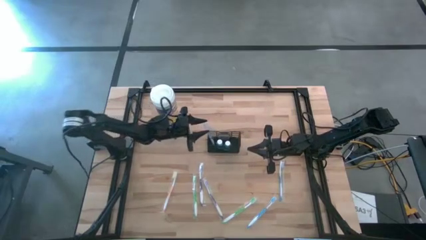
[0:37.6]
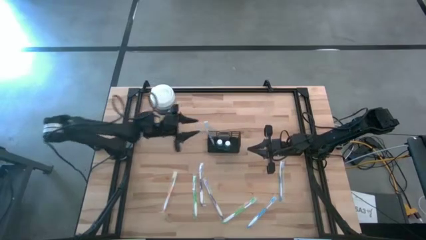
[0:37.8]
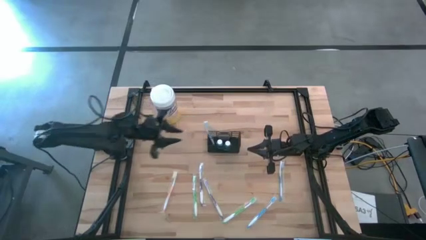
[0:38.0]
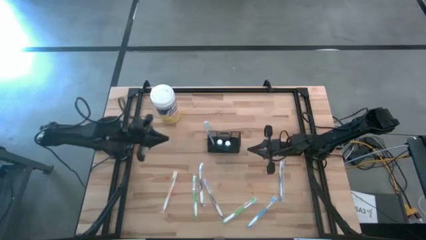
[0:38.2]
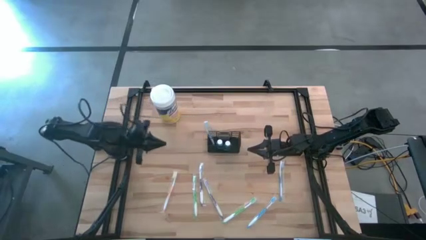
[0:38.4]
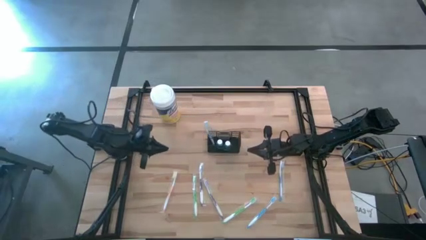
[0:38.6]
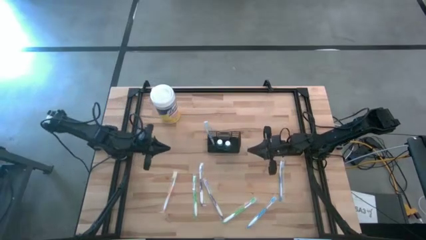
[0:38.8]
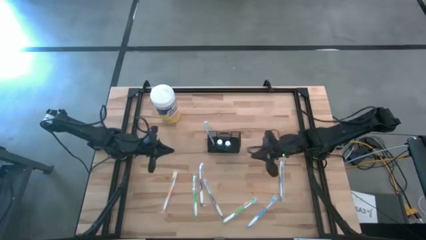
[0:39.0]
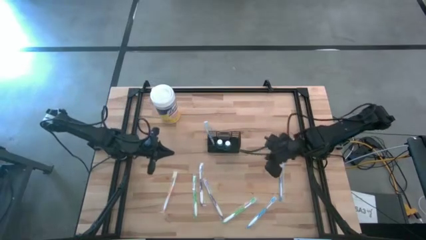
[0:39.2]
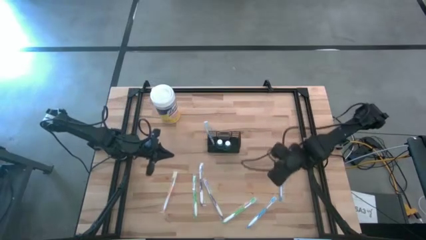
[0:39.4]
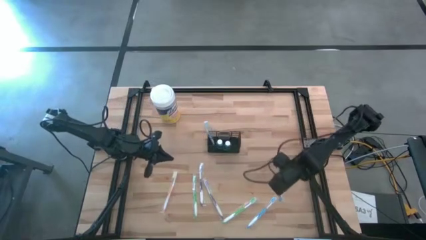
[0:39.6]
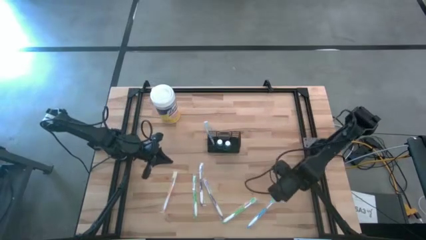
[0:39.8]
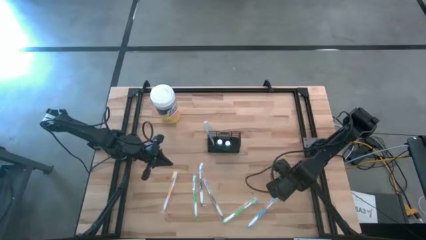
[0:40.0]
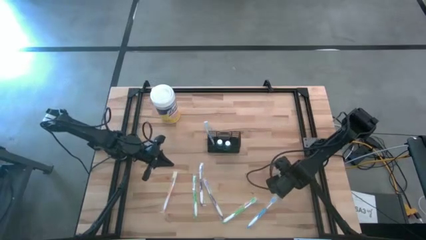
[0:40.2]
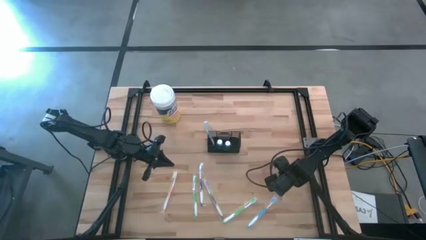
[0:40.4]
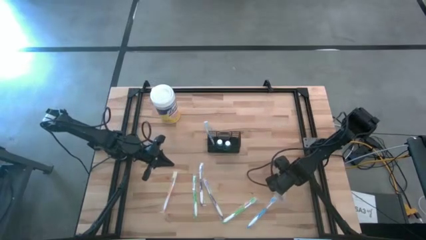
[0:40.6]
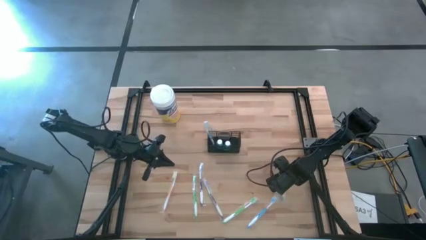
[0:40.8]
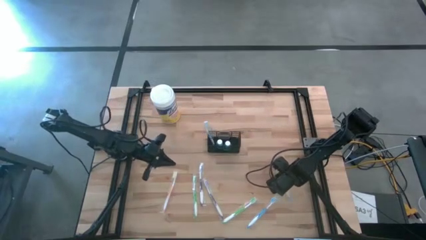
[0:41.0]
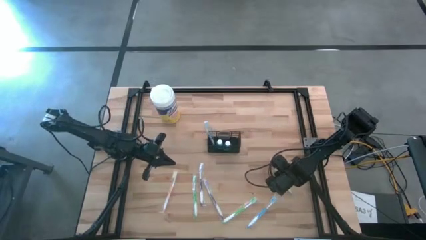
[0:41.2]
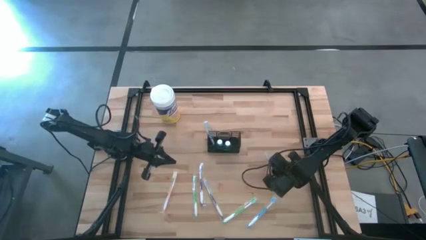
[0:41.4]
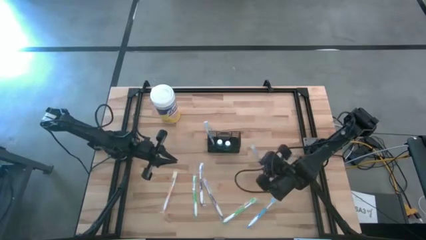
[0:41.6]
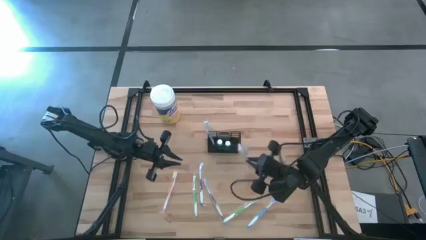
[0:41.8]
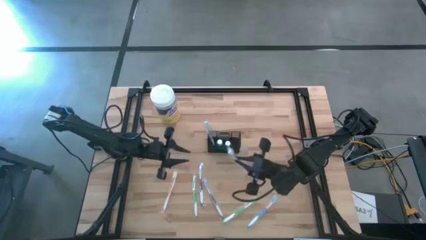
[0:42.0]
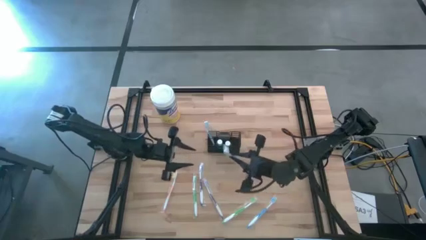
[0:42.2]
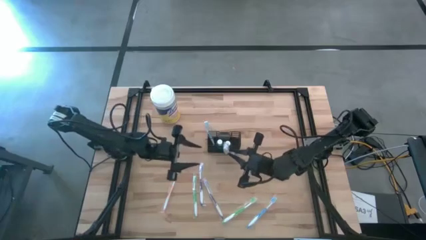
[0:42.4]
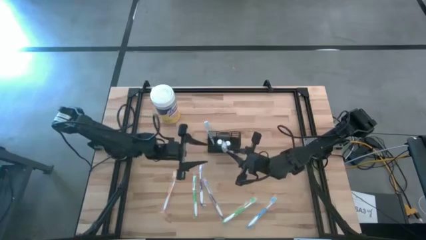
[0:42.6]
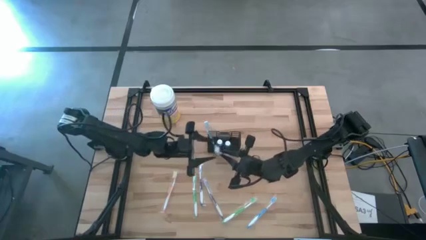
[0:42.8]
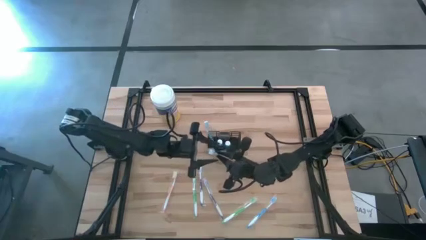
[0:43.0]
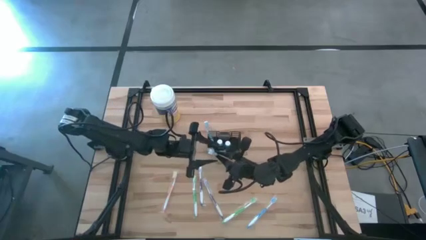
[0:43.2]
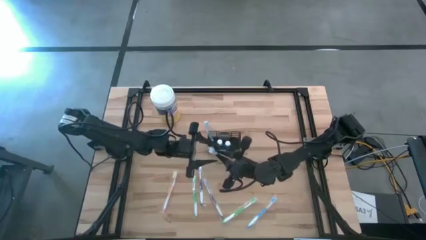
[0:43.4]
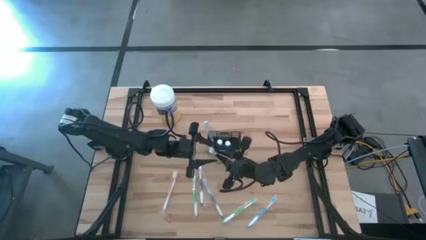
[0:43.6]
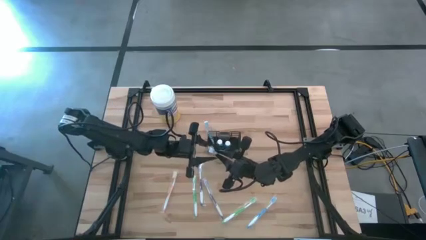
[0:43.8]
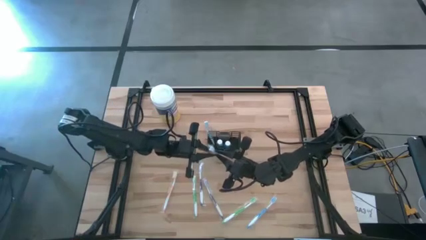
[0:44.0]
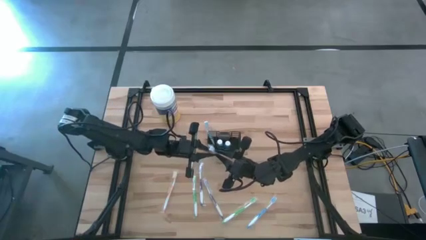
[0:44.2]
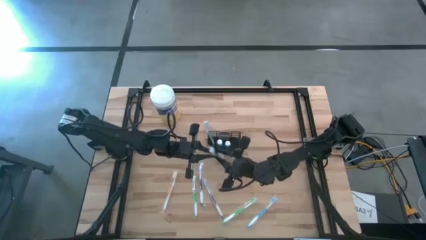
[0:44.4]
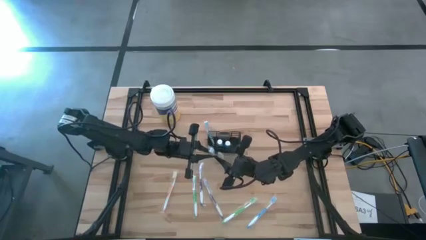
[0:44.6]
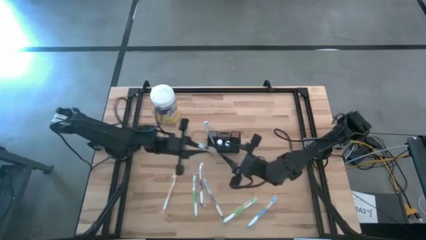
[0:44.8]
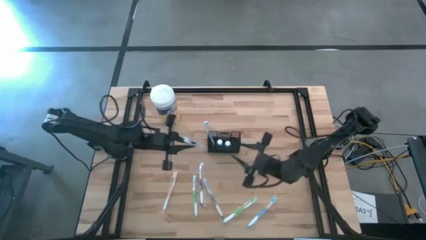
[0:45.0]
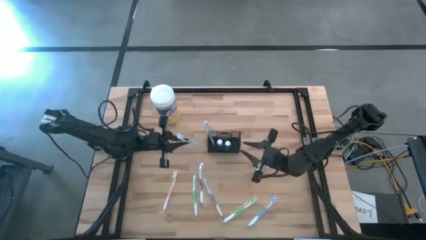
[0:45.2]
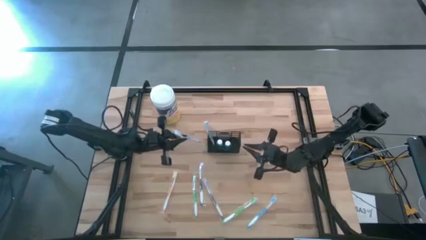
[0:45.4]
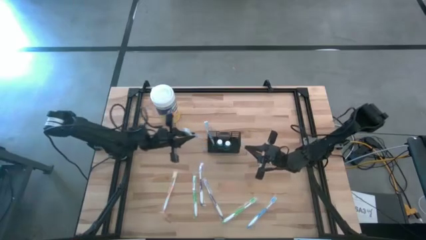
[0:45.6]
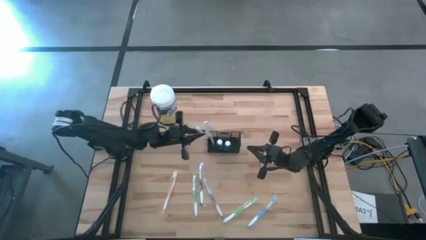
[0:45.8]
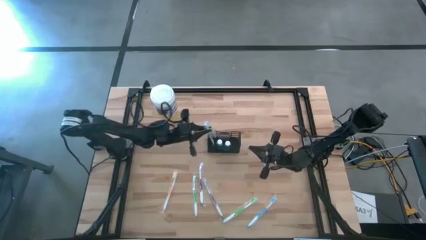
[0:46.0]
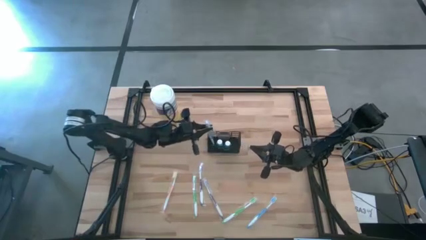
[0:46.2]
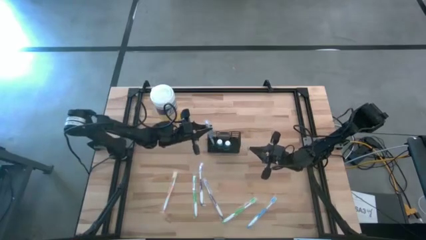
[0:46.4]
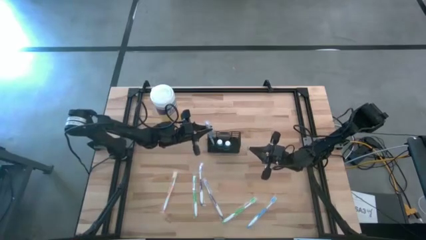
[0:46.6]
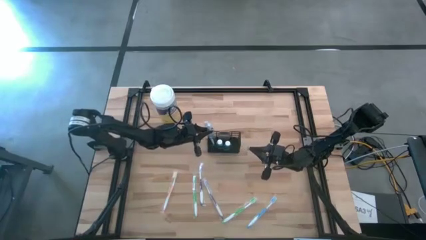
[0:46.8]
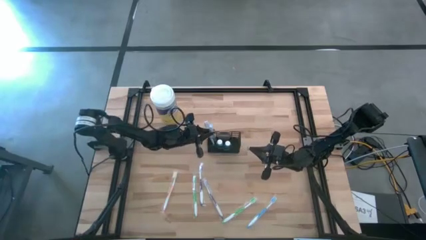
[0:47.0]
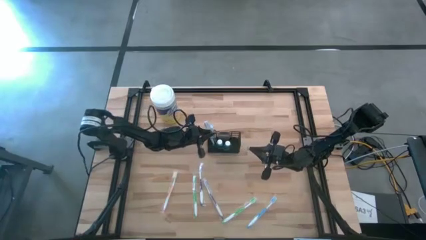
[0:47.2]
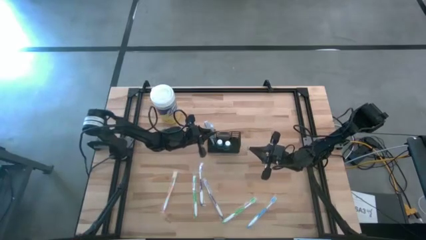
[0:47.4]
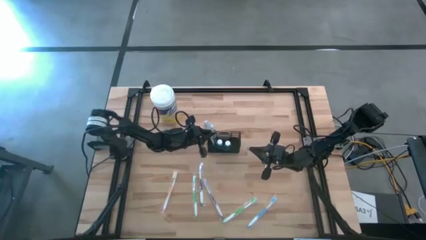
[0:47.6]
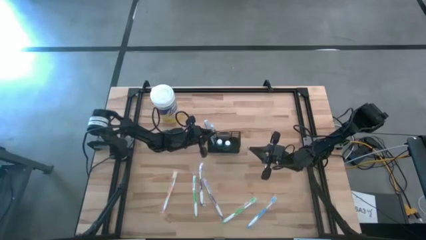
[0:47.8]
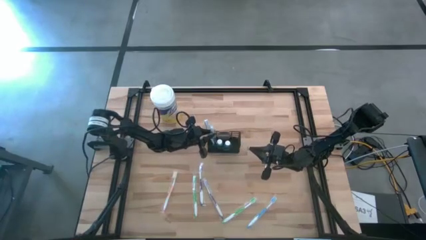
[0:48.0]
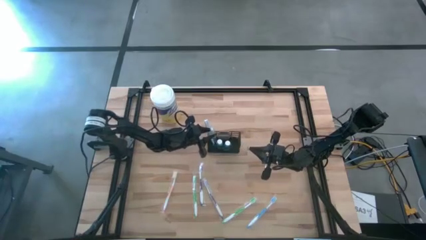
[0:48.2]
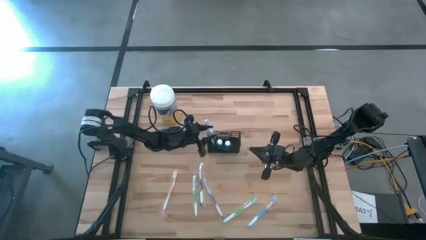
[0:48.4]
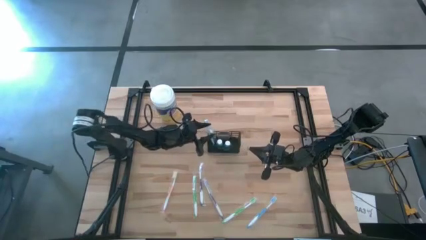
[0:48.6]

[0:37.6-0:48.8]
Task: Pick & Place toothbrushing station
Put the top blue toothbrush into the black mesh organizer
